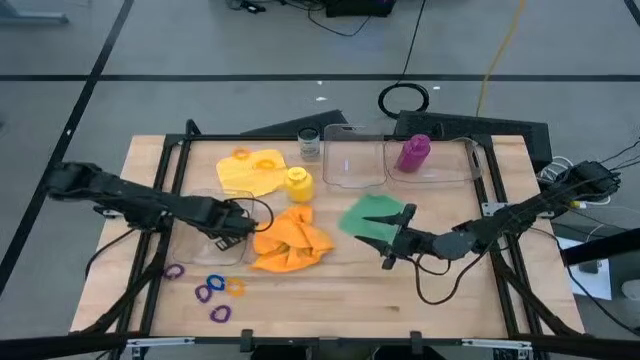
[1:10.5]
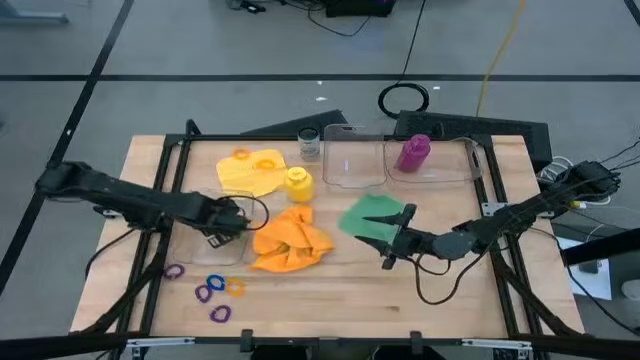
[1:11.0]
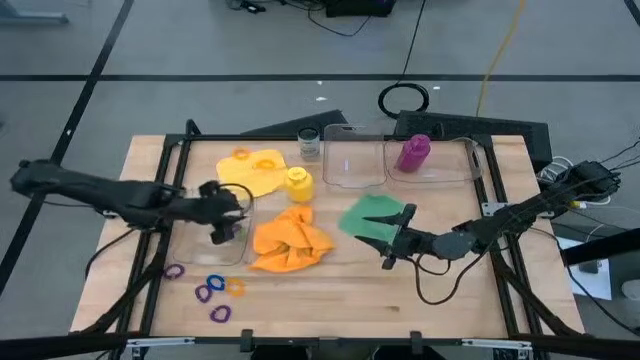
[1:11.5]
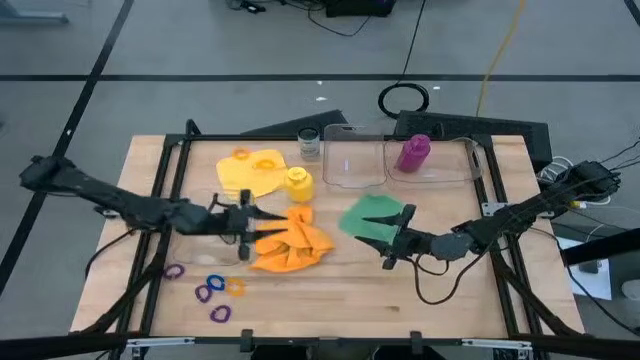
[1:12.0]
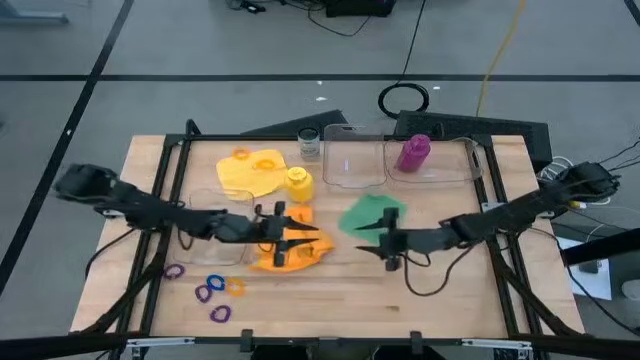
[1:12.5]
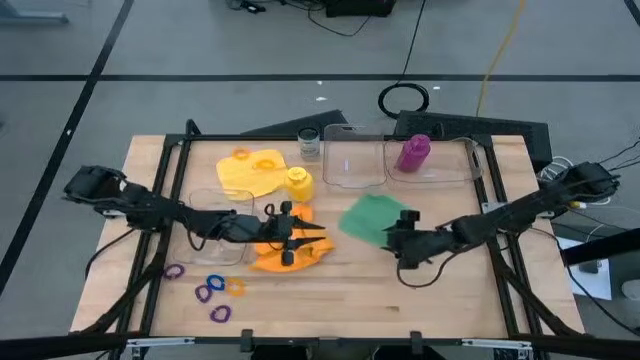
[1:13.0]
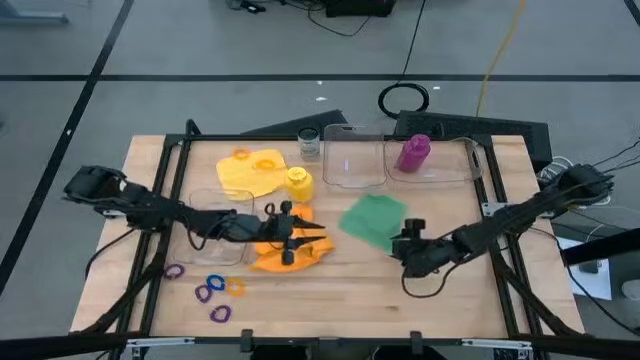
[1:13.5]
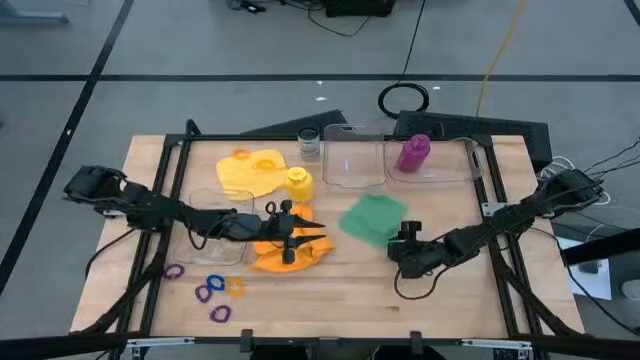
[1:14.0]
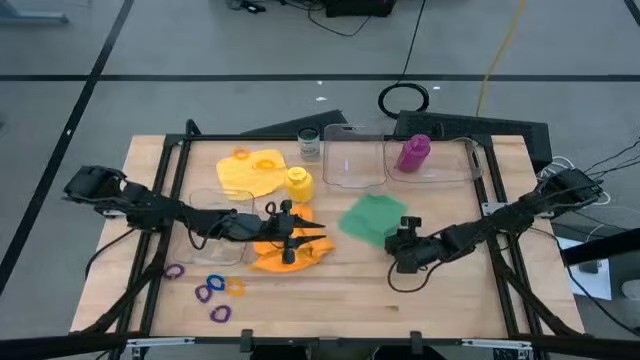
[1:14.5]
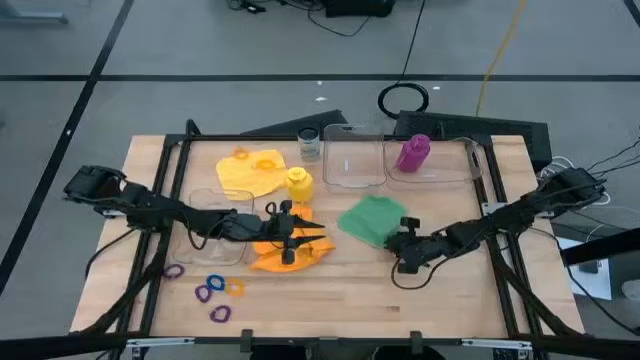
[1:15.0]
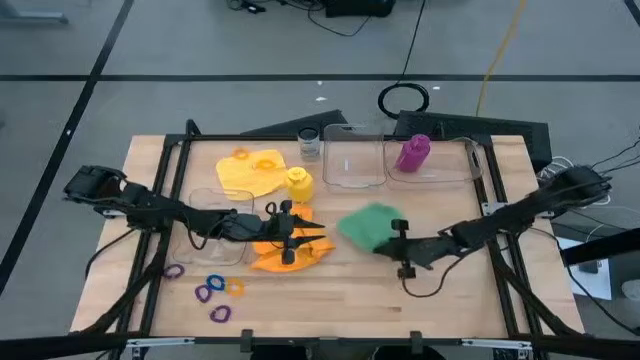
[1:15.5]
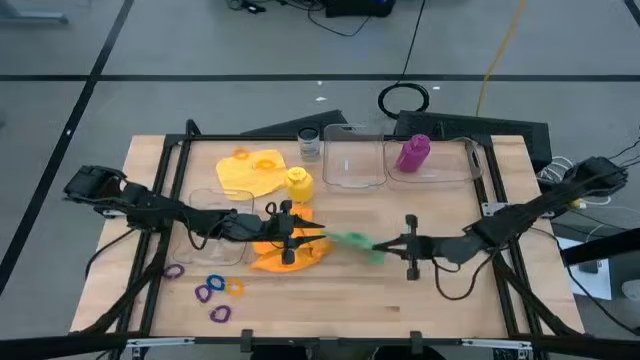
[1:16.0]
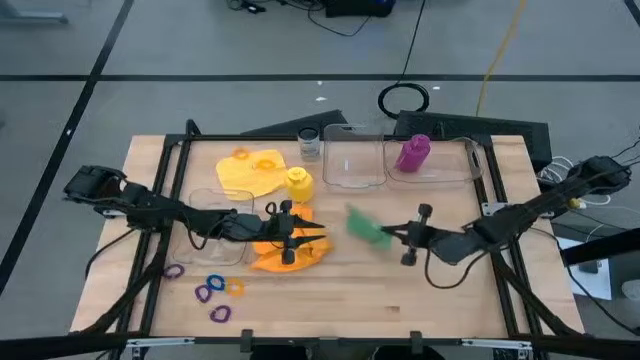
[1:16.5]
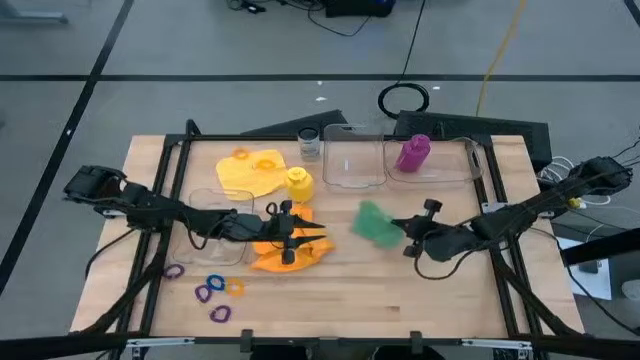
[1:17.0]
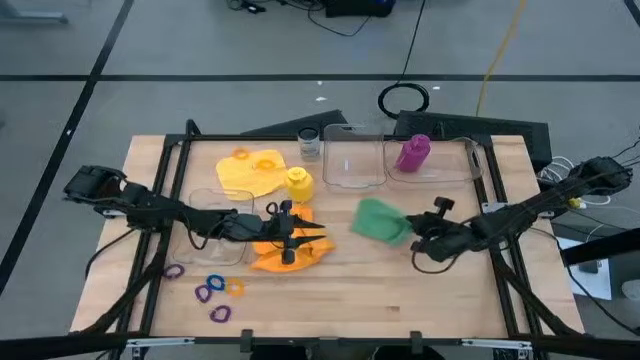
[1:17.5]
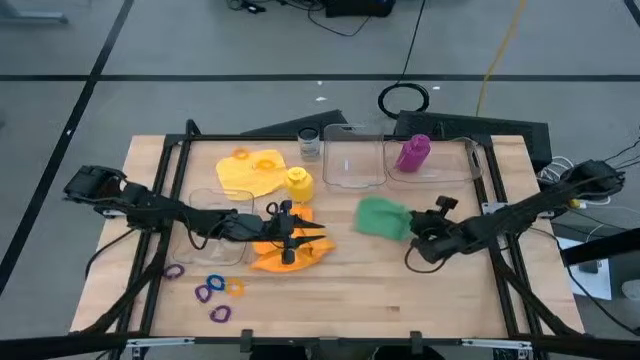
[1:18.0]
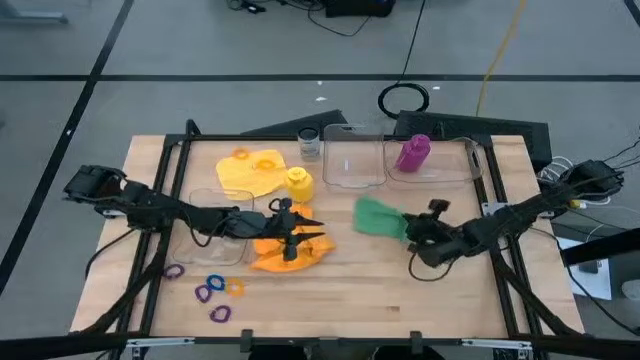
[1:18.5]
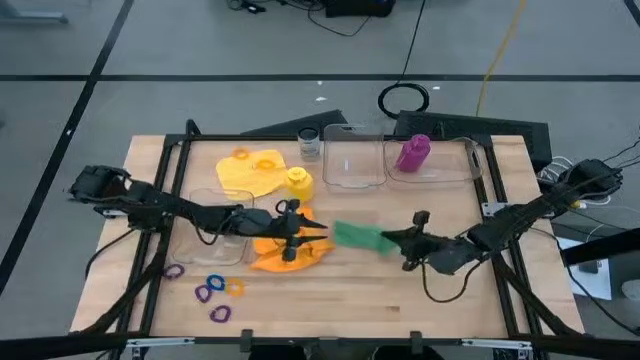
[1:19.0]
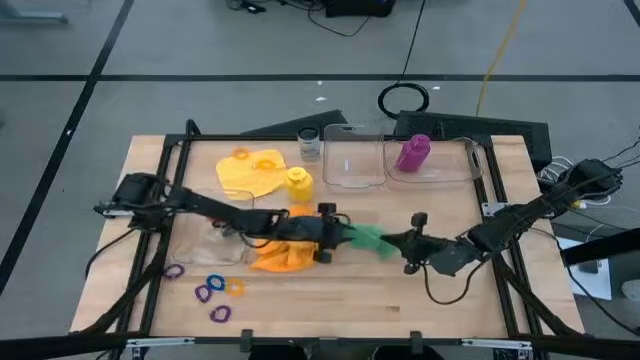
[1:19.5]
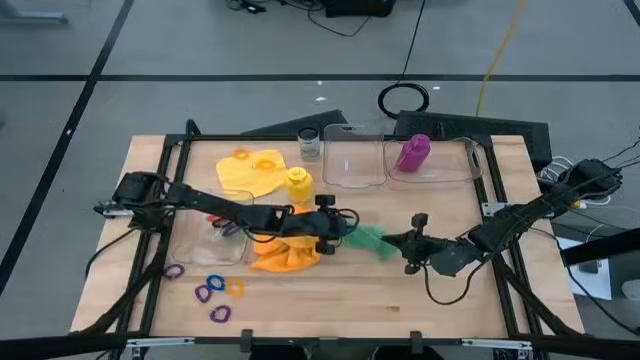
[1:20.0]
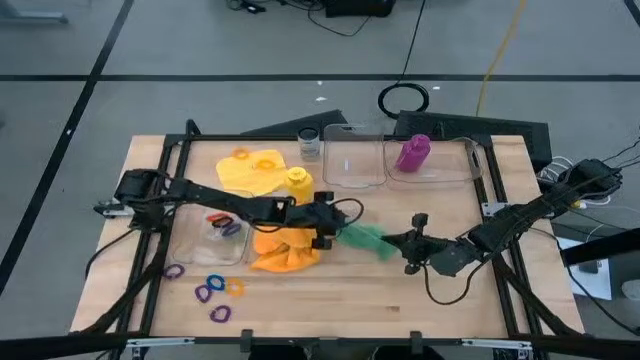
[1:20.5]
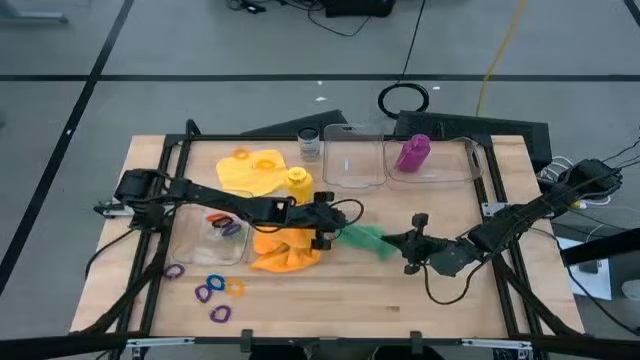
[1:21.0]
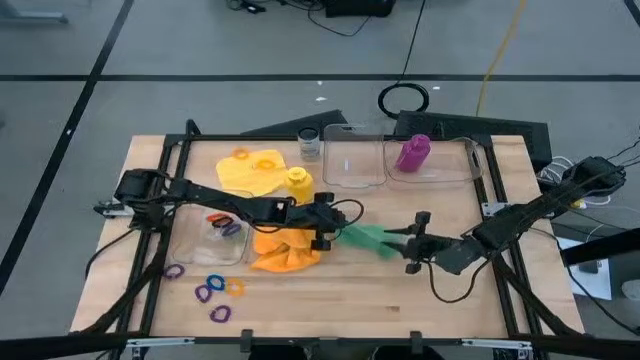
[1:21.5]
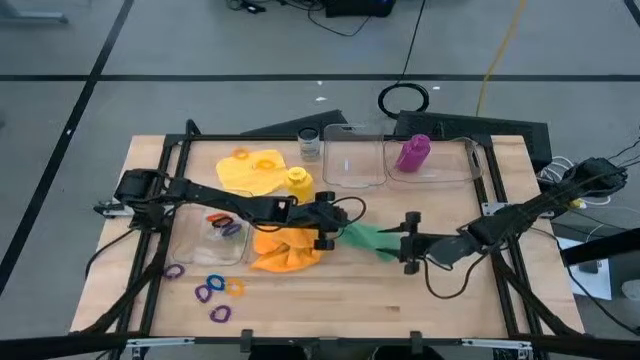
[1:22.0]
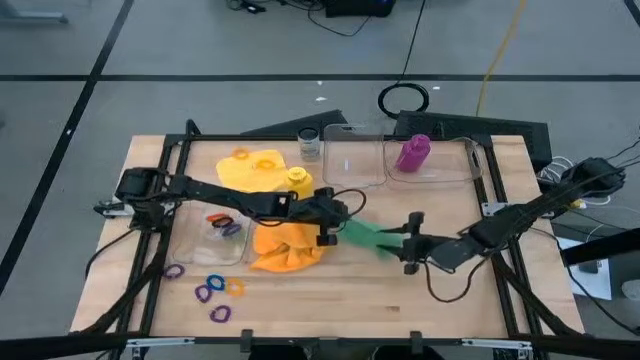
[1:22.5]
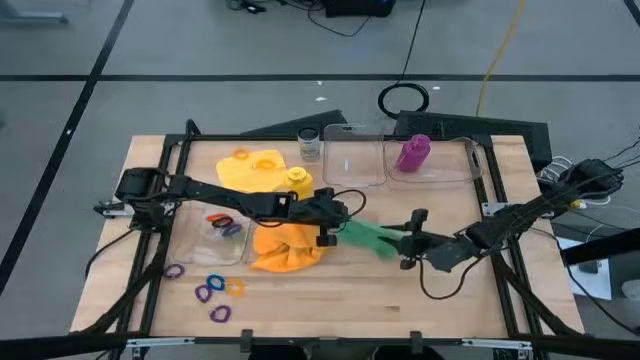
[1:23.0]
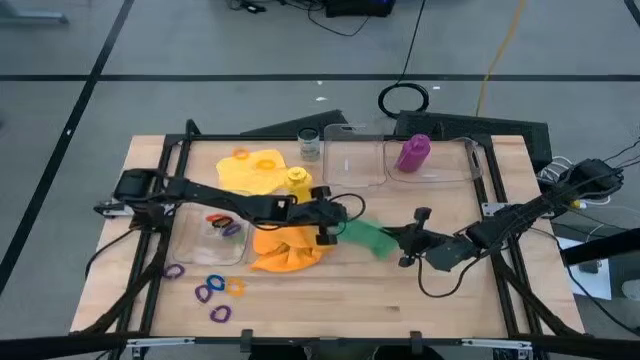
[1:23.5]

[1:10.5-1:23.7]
Task: Pick & Place Sports Items
Fold the green towel
